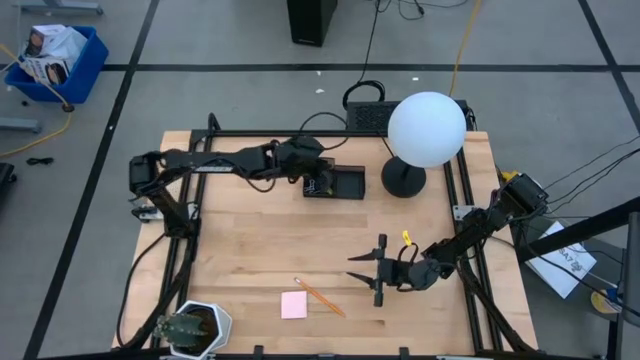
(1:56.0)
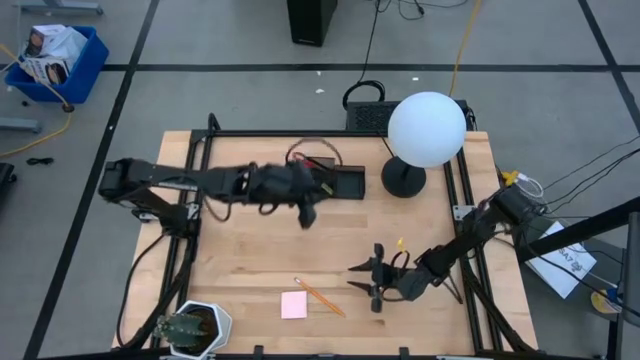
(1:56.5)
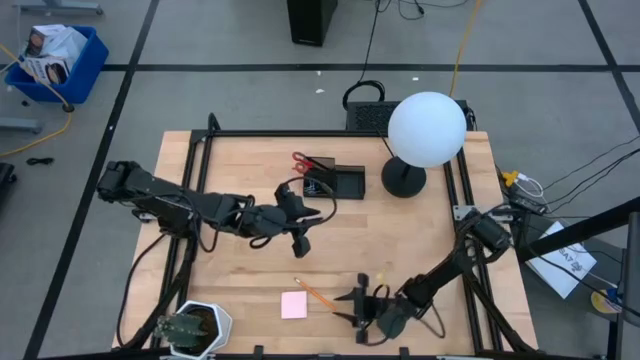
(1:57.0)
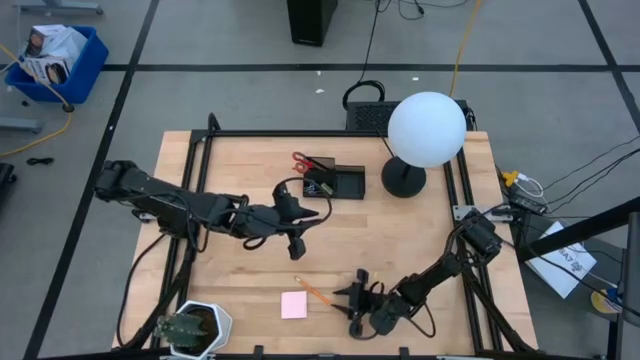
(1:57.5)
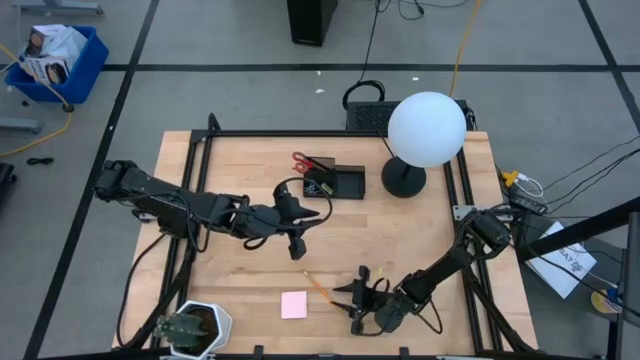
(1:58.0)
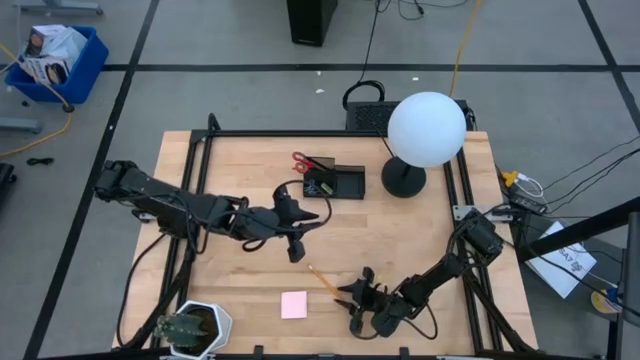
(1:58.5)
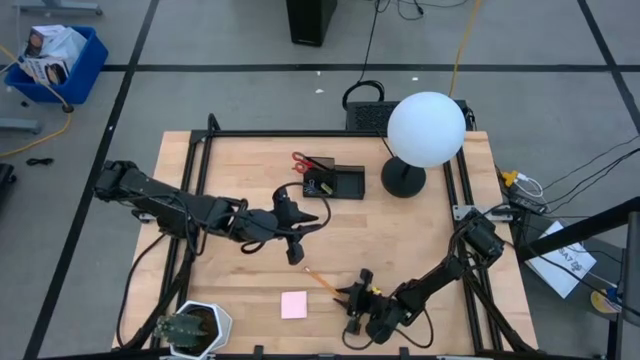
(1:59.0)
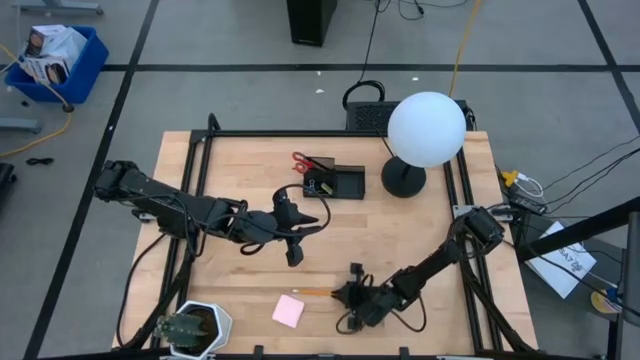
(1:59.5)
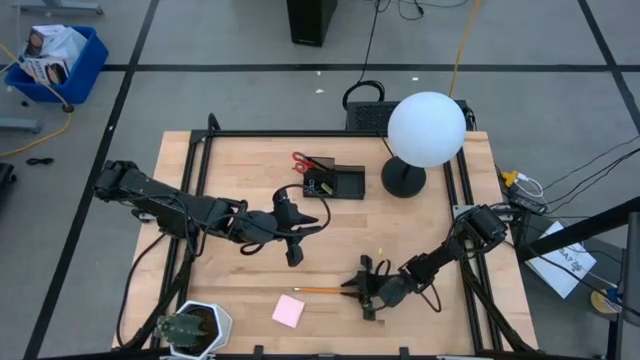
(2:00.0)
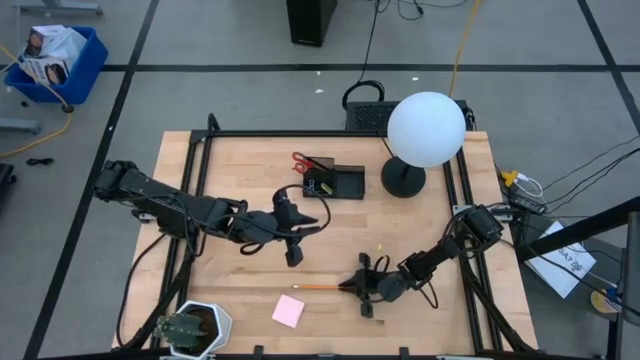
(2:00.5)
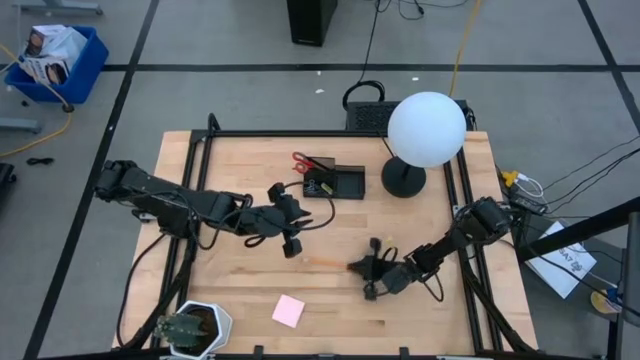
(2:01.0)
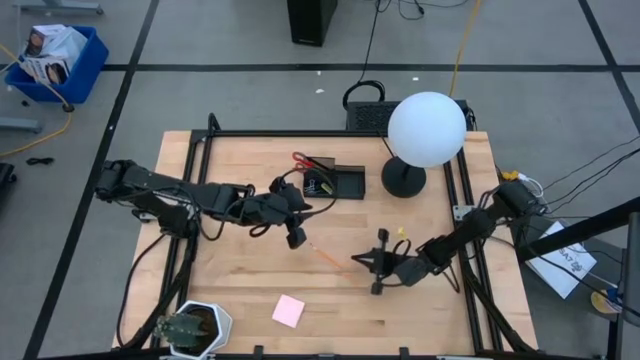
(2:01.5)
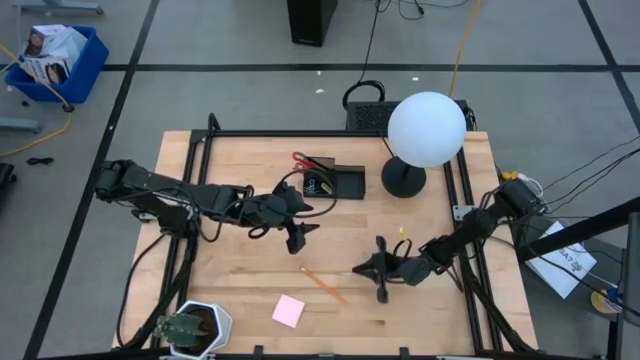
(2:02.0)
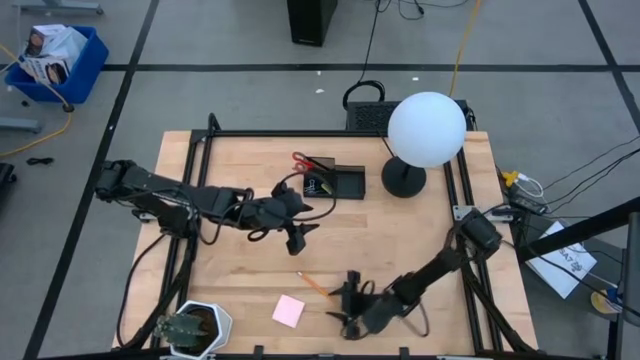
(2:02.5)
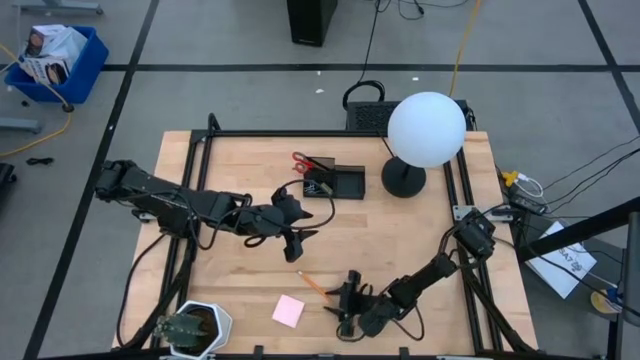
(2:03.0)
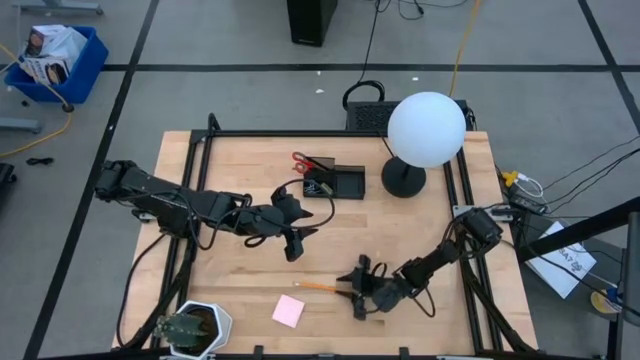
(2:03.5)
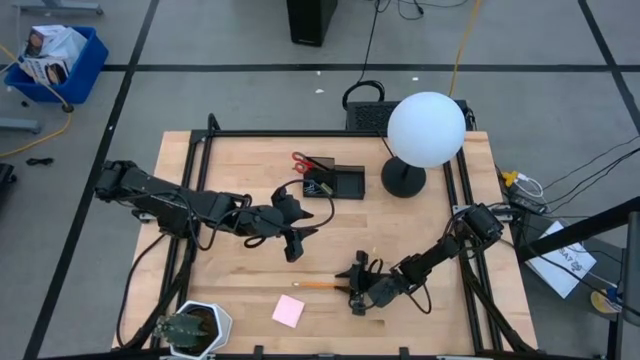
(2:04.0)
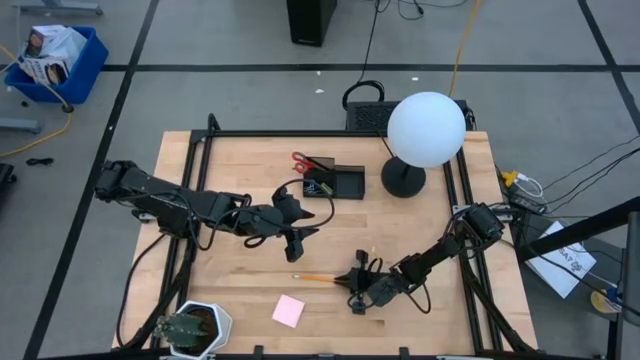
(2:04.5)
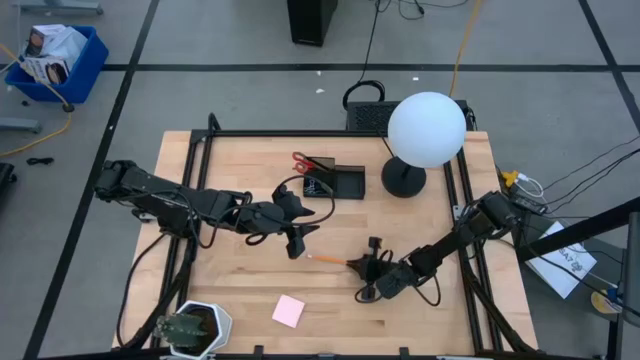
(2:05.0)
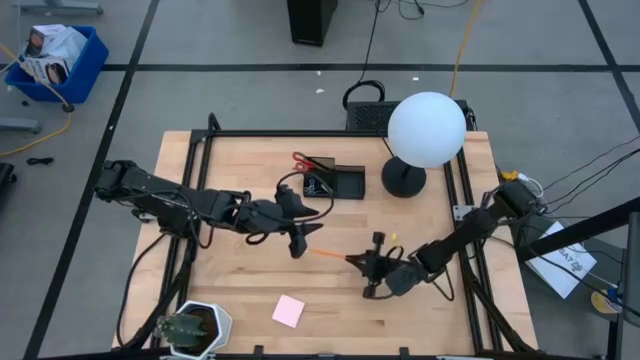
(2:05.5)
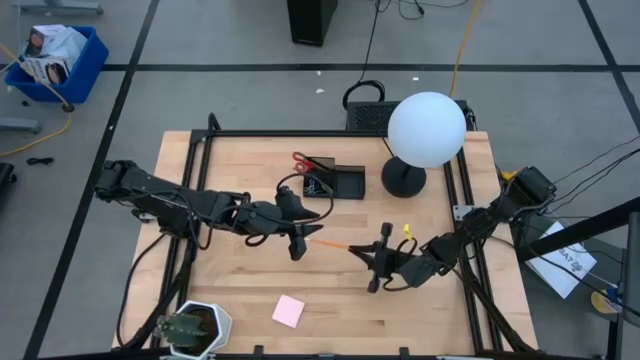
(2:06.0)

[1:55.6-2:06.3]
Task: Pick and place office supplies into organizer
Put the yellow pencil into the black desk organizer

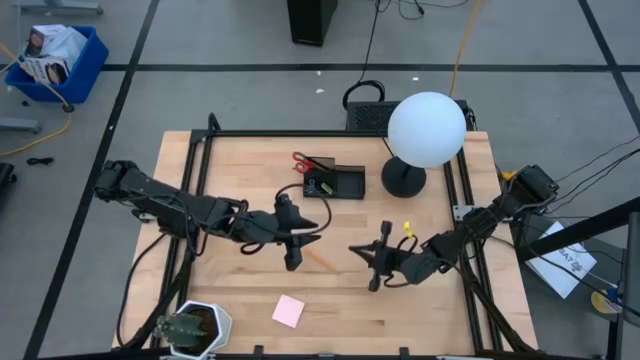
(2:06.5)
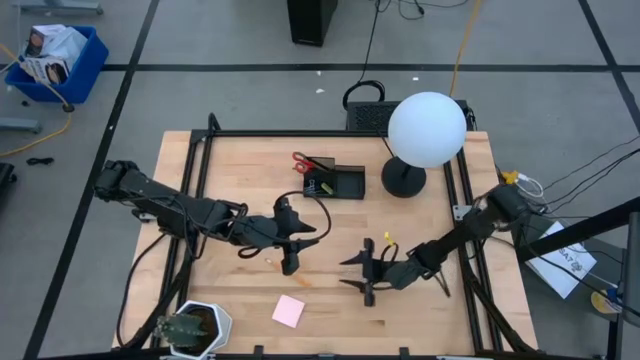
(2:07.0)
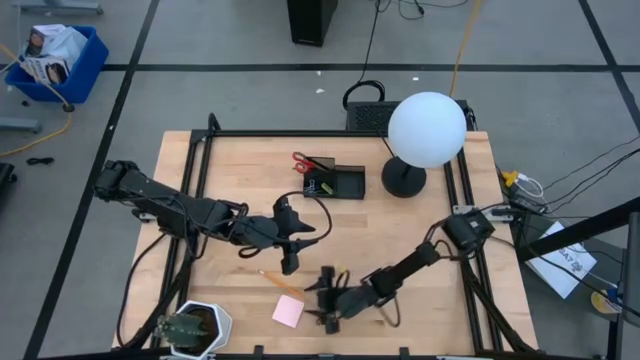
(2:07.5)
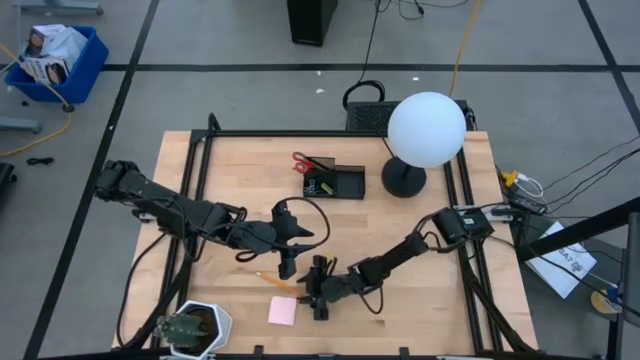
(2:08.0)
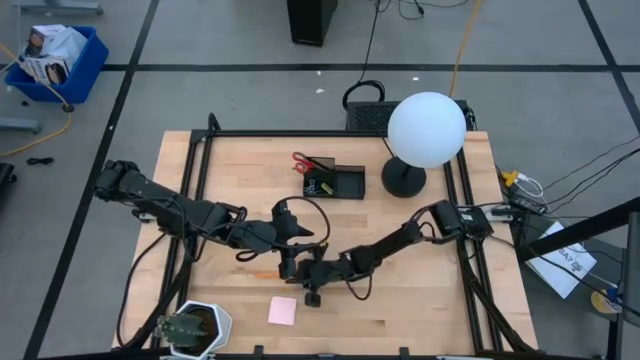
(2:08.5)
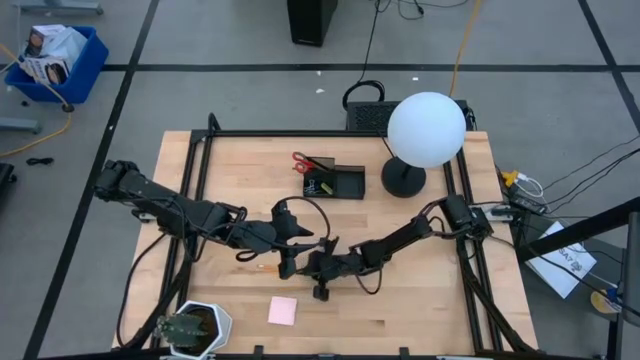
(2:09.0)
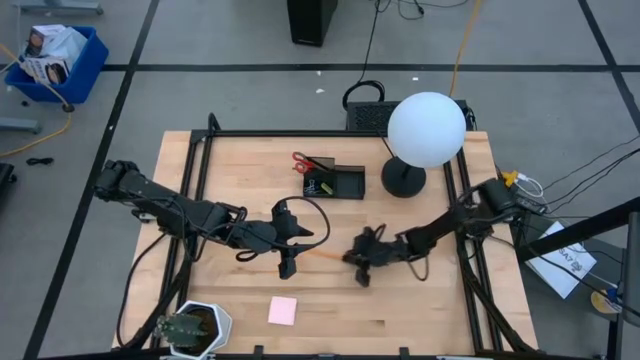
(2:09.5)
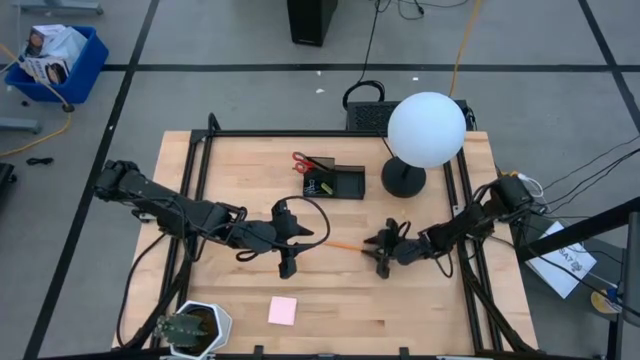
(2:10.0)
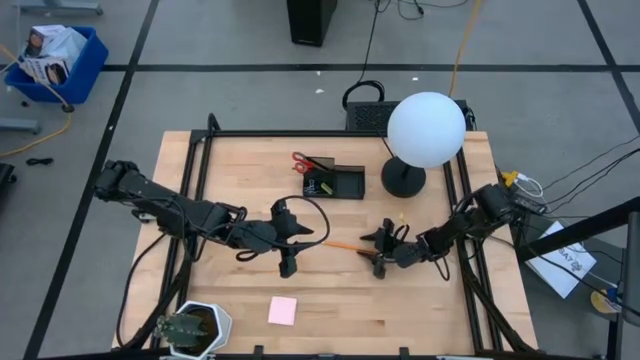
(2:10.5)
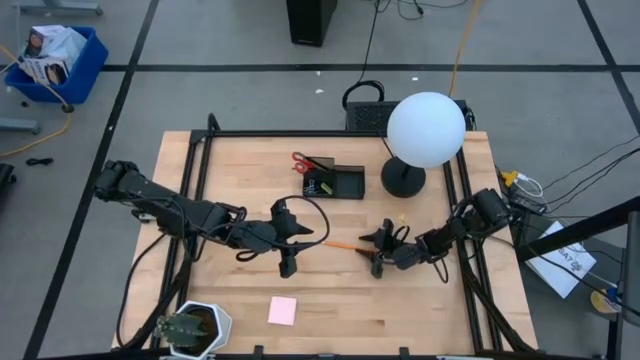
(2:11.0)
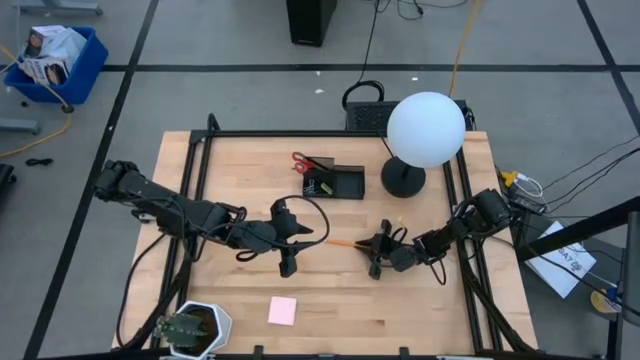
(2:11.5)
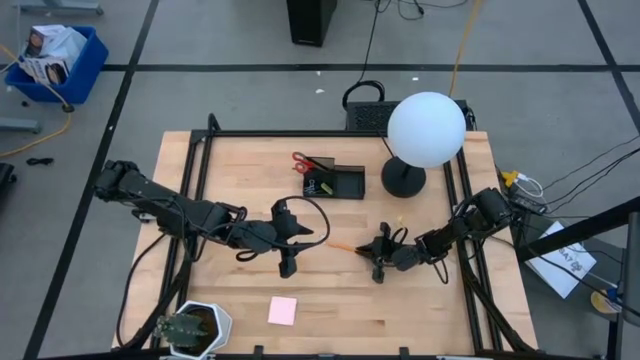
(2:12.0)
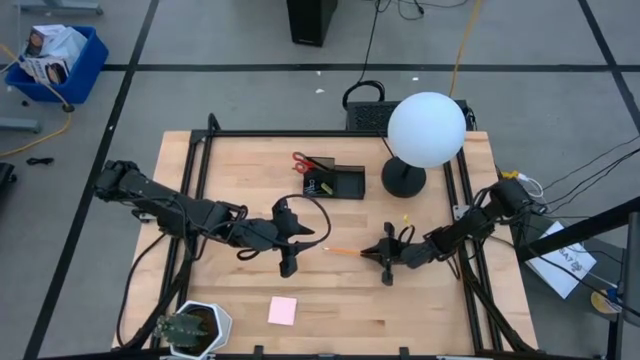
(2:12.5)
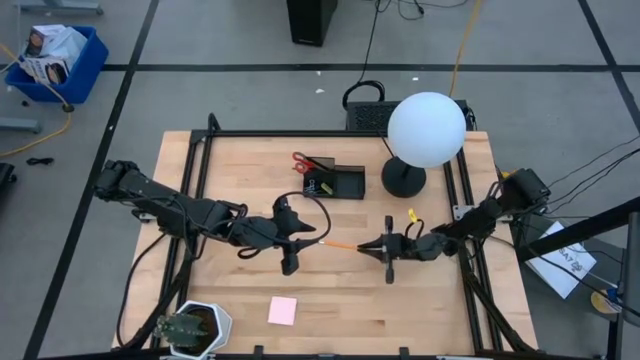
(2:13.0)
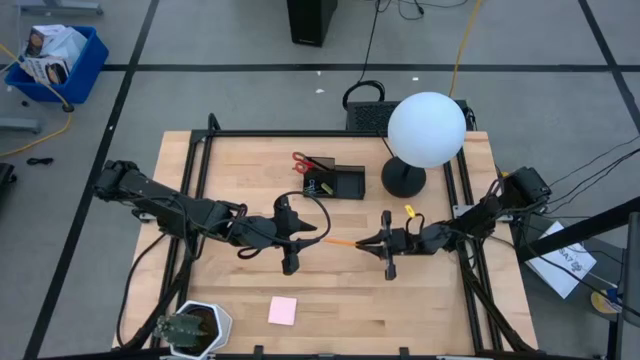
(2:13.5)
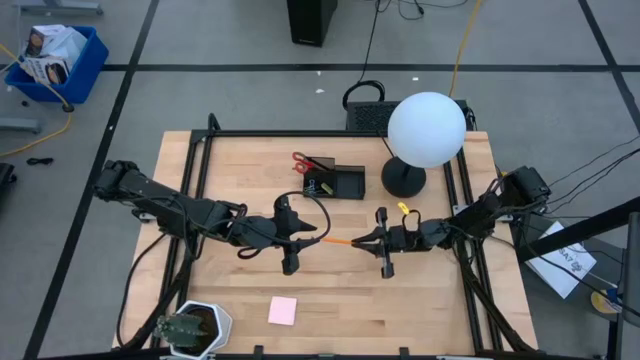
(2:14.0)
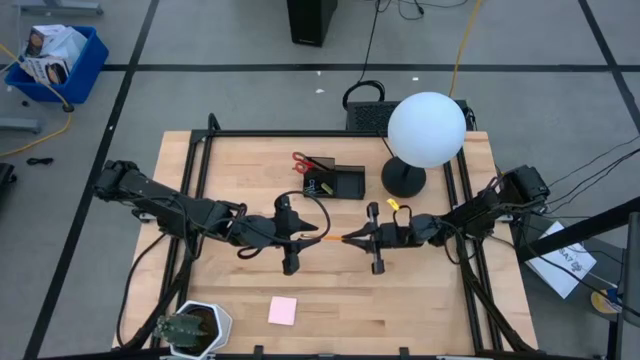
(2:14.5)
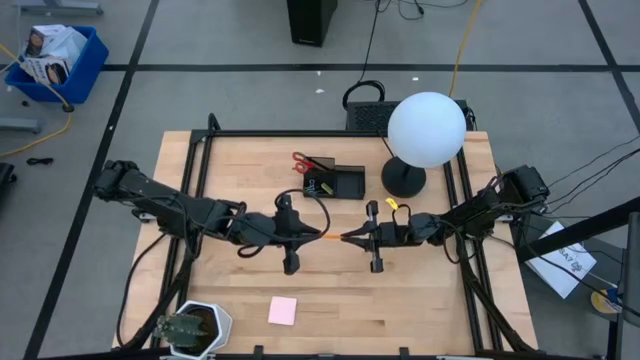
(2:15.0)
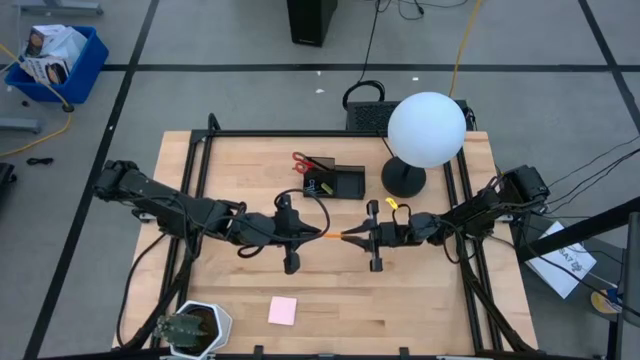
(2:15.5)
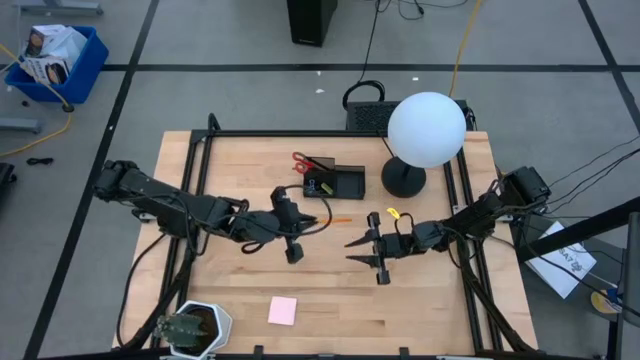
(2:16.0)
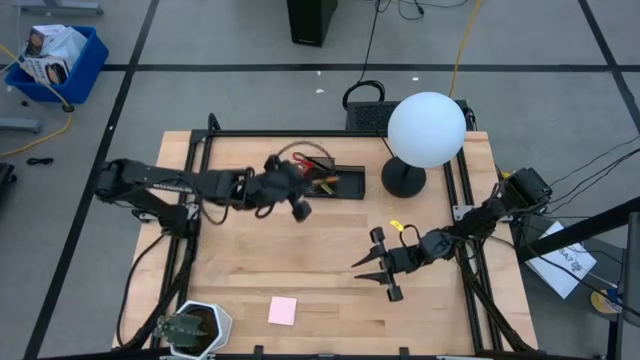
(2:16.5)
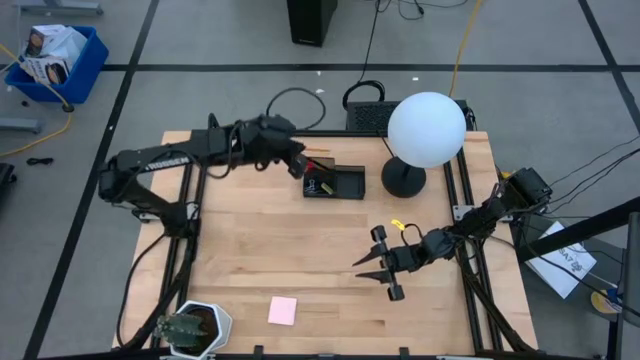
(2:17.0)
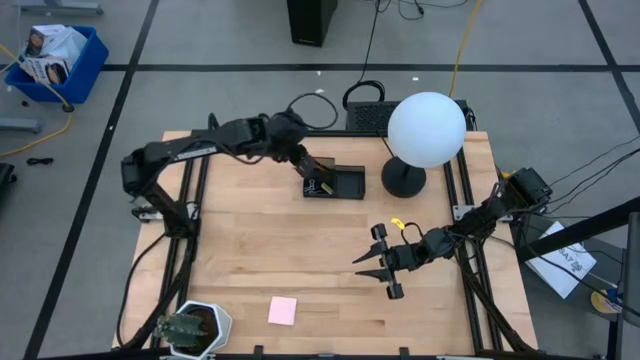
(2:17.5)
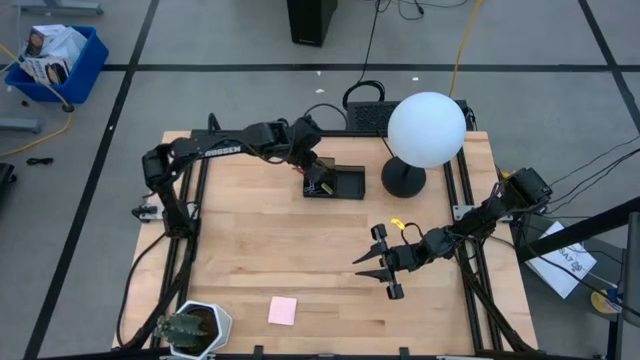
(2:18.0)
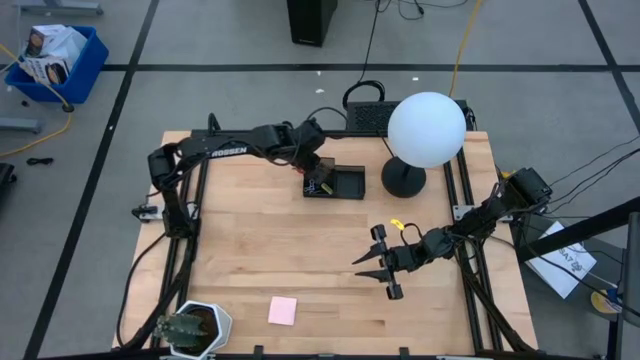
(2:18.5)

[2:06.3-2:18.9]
Put the yellow pencil into the black desk organizer
